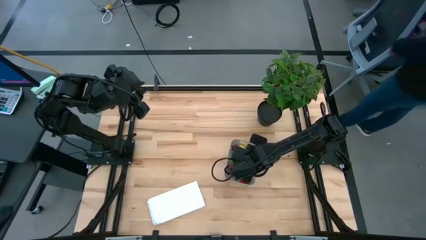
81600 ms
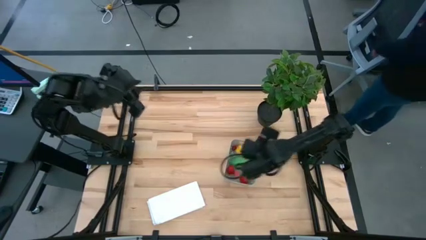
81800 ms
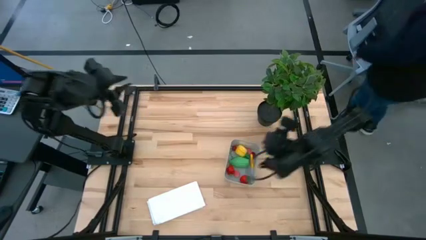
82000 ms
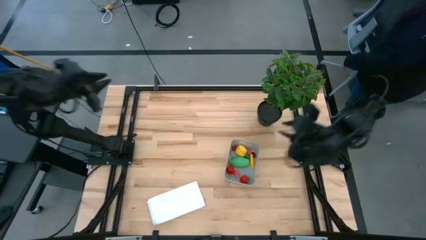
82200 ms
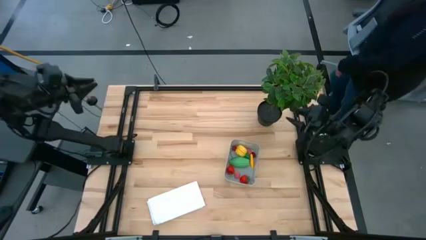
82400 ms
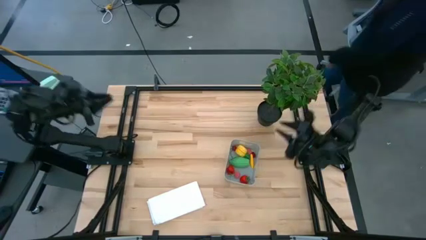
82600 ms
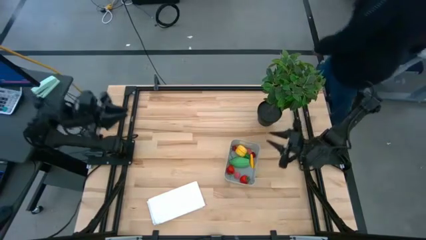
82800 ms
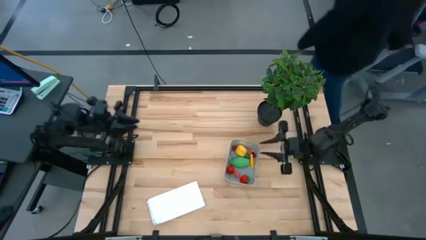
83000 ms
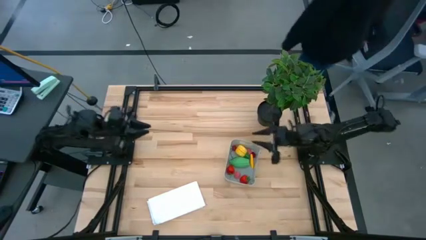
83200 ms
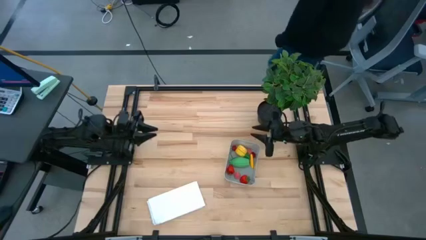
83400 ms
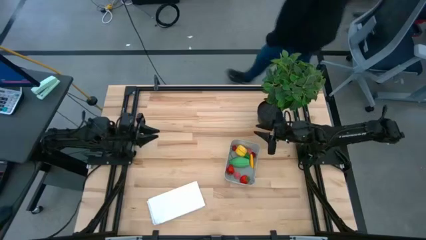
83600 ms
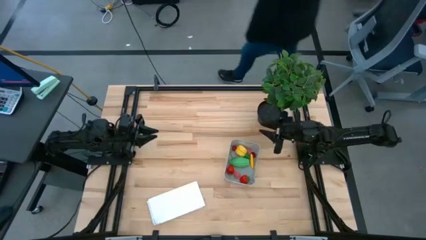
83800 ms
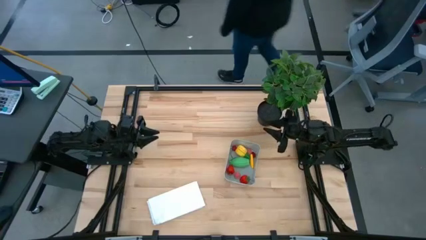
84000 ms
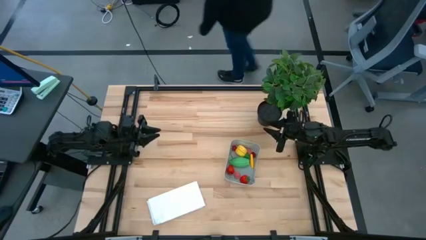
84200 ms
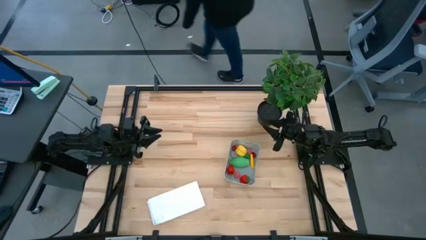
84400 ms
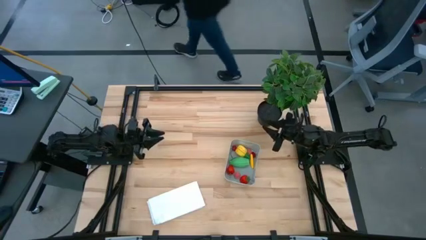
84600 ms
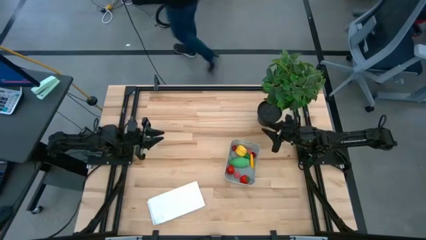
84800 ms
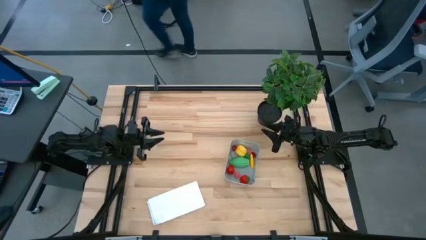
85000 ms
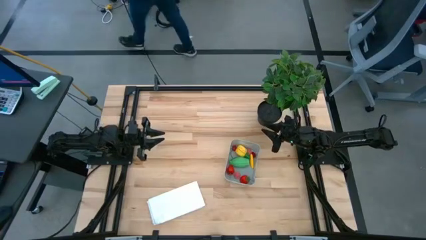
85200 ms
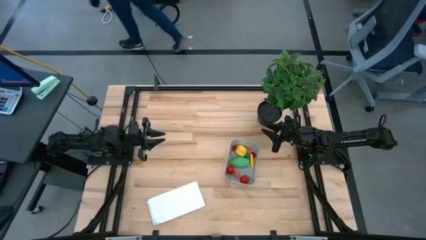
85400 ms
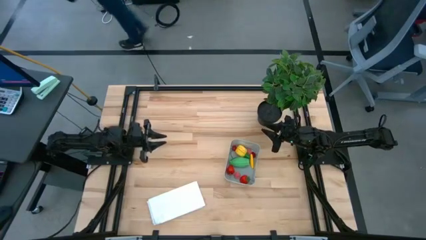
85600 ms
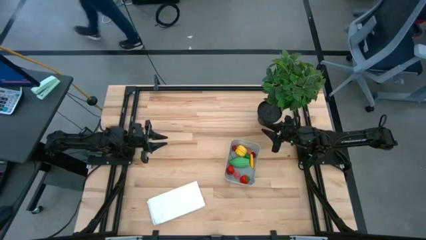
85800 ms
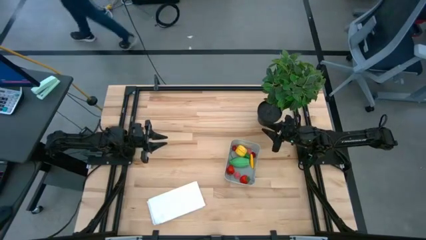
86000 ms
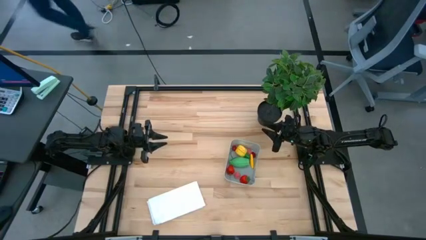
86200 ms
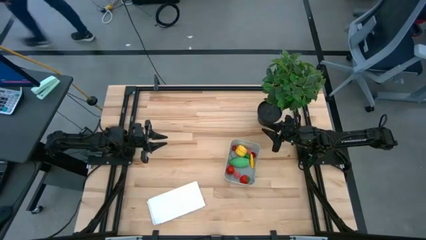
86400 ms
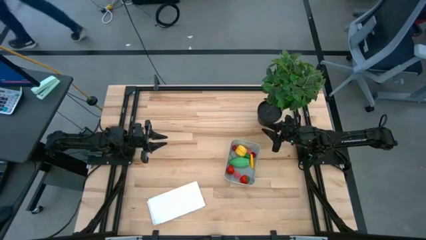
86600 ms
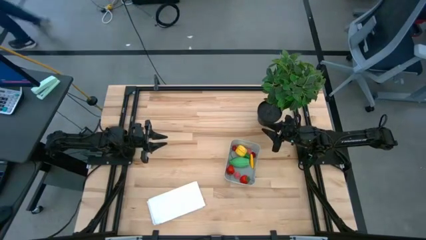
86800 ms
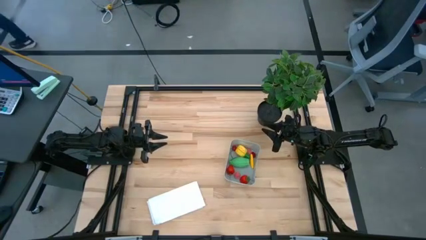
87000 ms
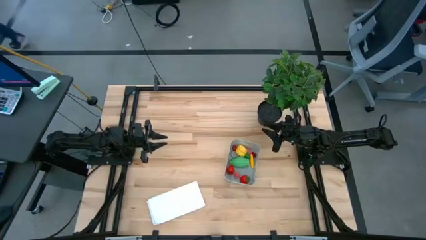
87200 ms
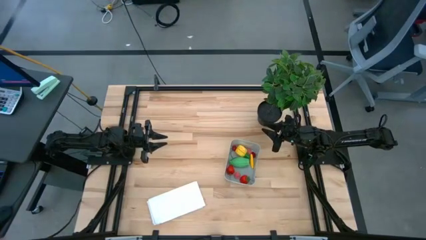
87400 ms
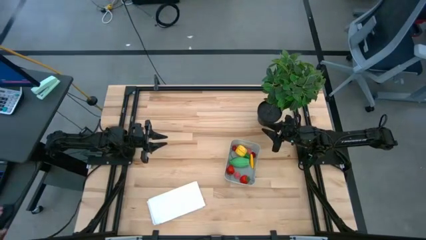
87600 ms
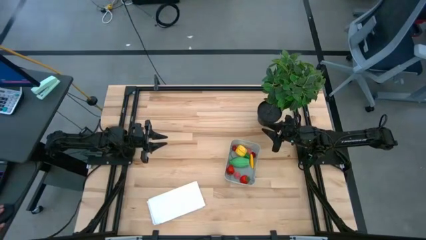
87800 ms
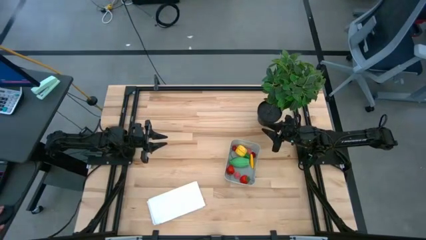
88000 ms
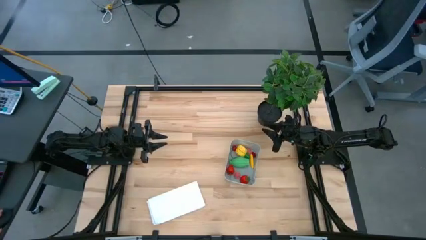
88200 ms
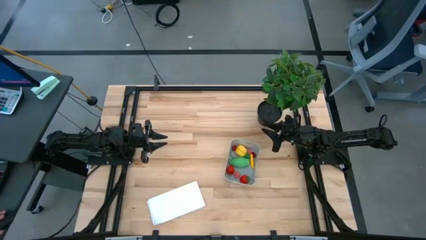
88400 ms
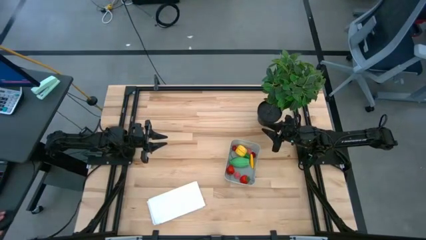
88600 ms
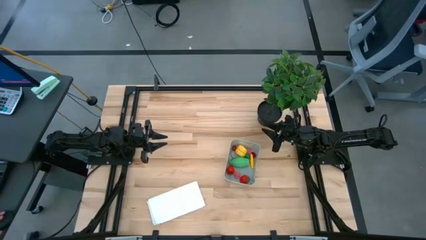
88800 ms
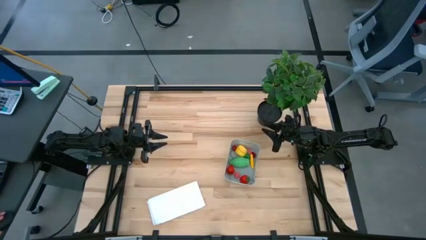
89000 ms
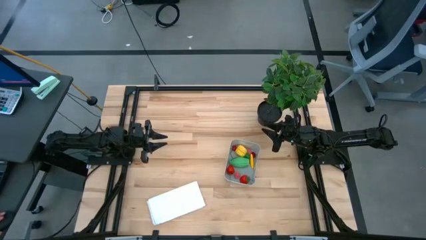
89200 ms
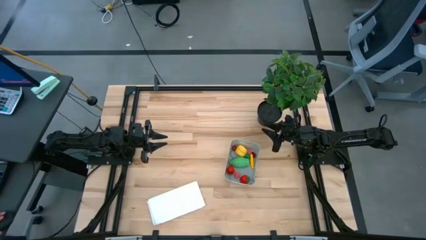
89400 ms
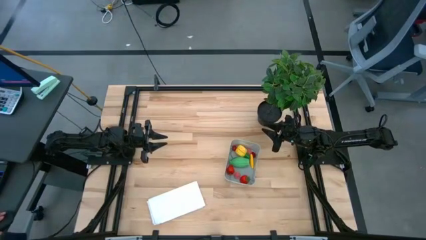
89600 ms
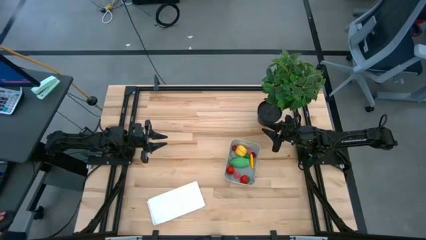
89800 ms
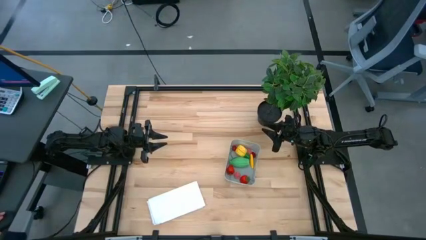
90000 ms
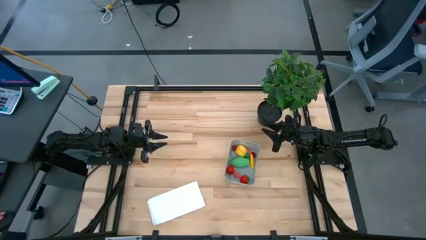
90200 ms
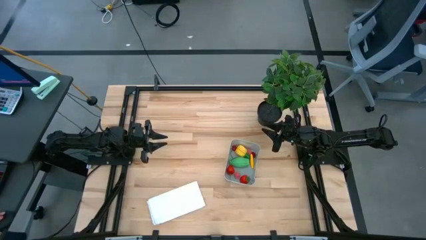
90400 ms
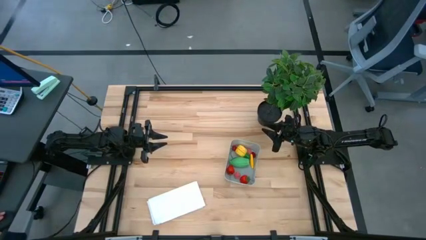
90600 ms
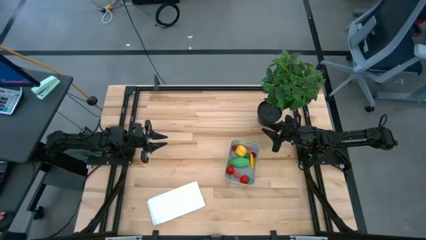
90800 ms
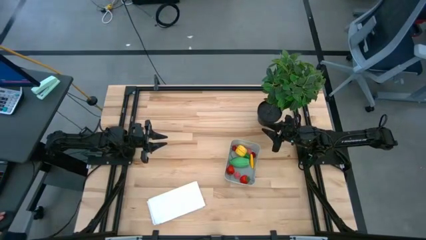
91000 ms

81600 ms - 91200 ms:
Task: Pick and placing Produce into tupperware
Return to Home Position

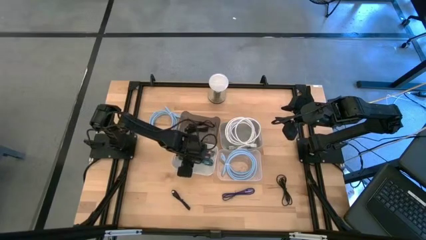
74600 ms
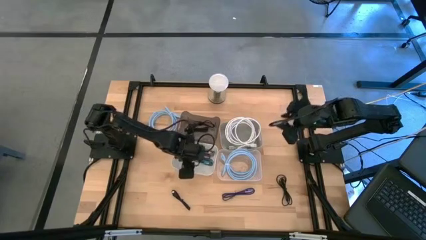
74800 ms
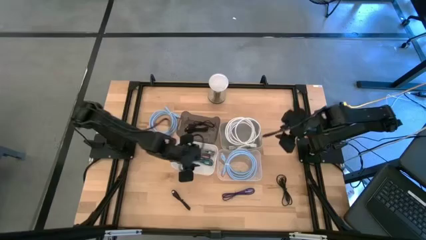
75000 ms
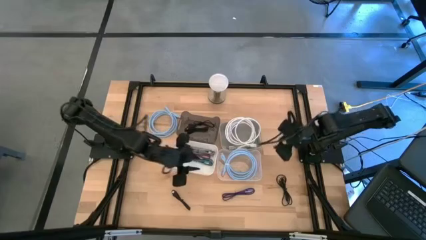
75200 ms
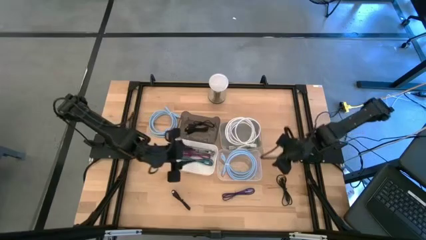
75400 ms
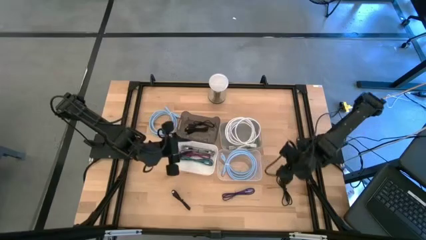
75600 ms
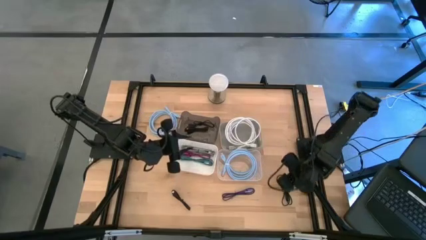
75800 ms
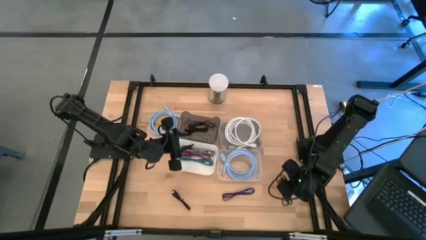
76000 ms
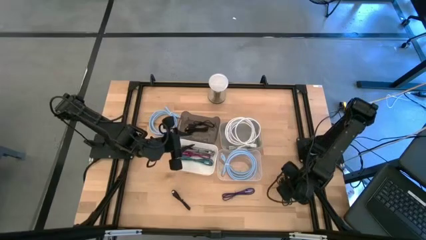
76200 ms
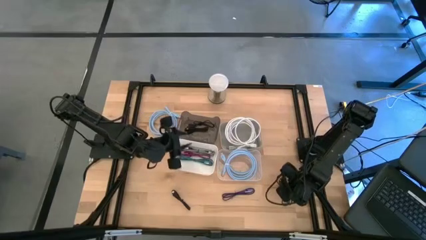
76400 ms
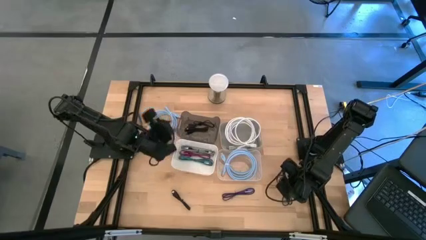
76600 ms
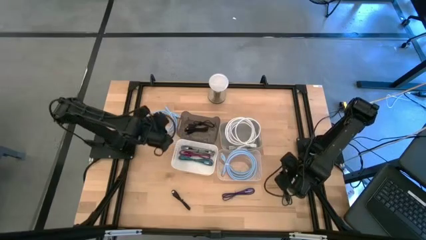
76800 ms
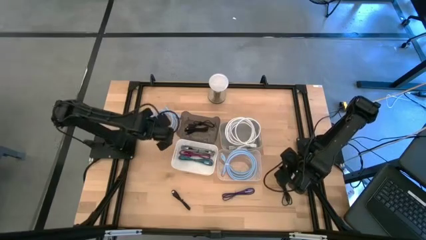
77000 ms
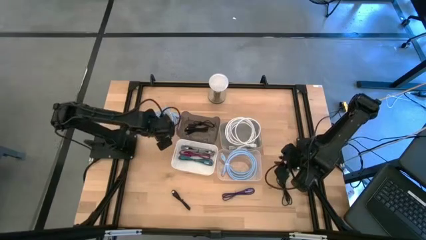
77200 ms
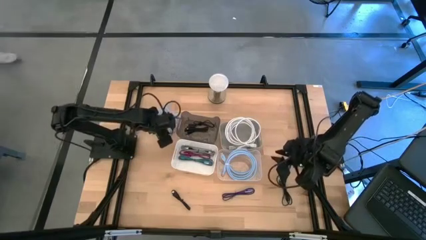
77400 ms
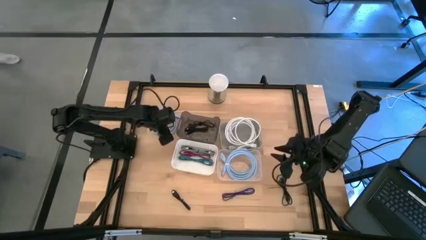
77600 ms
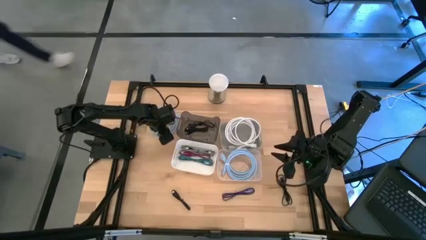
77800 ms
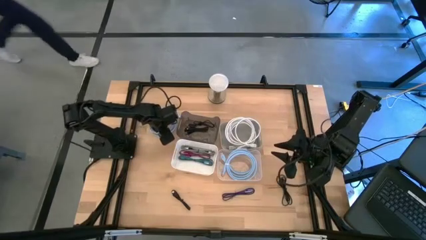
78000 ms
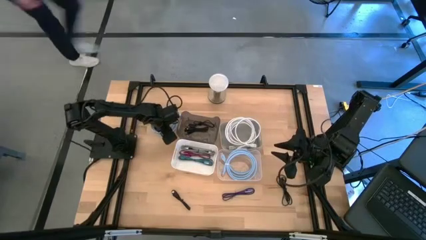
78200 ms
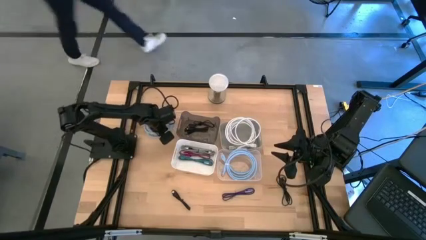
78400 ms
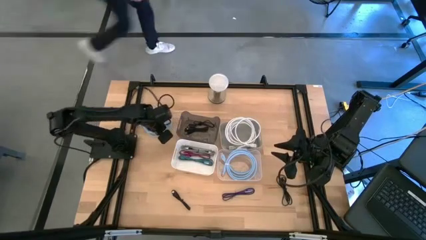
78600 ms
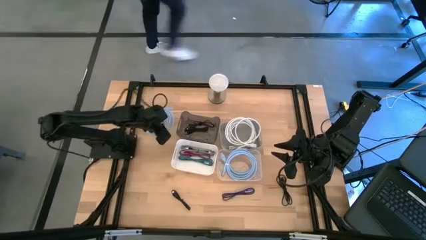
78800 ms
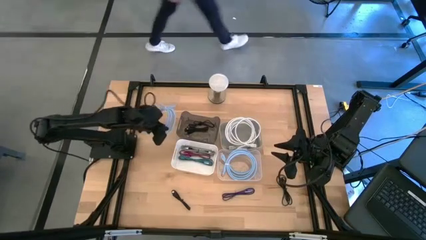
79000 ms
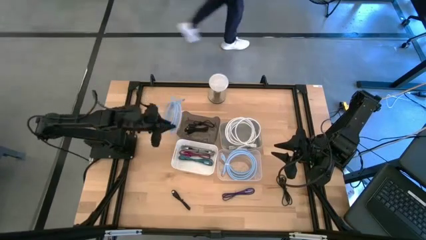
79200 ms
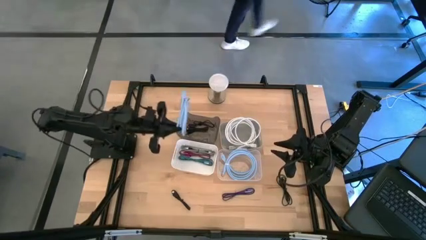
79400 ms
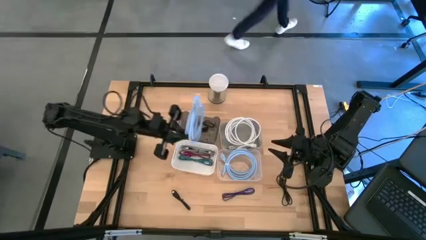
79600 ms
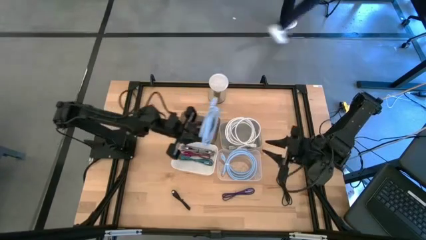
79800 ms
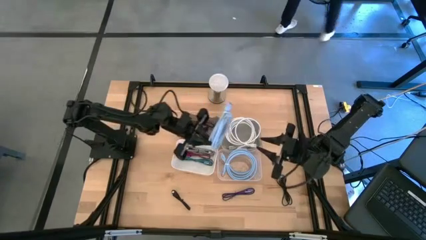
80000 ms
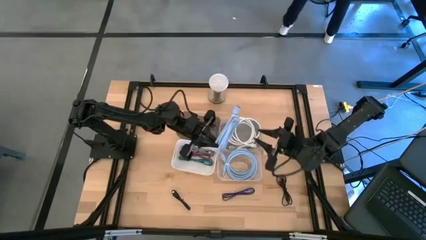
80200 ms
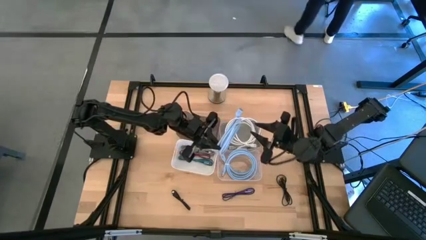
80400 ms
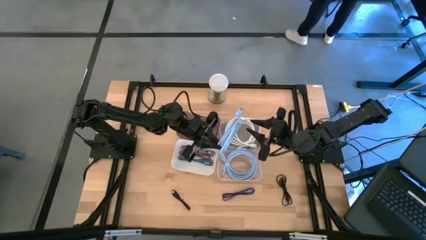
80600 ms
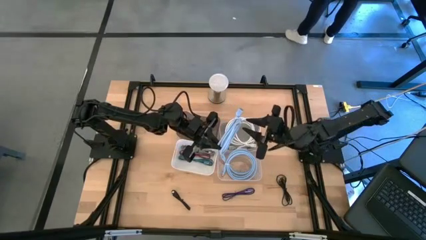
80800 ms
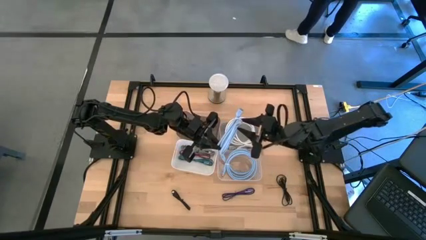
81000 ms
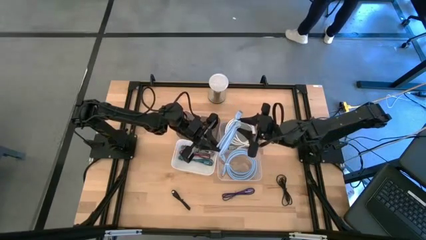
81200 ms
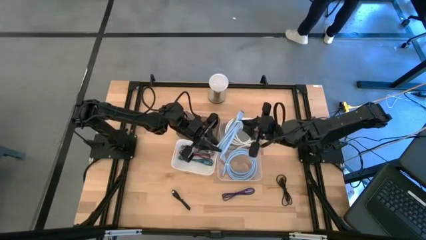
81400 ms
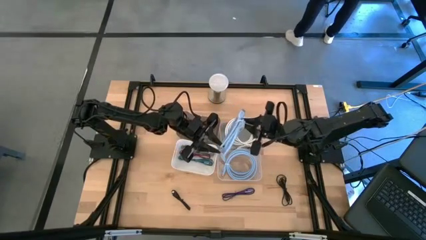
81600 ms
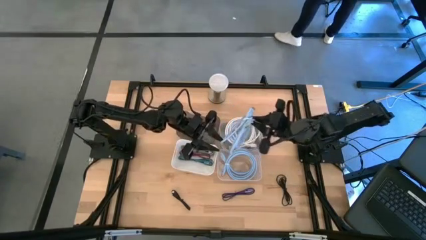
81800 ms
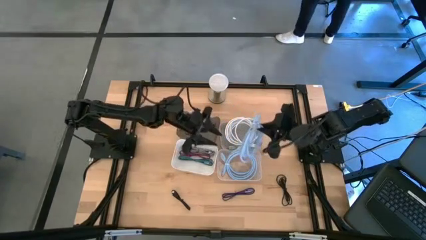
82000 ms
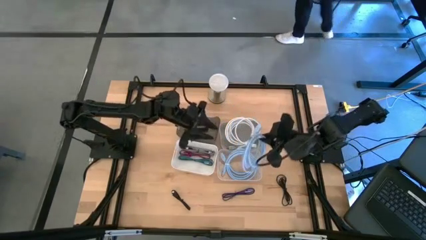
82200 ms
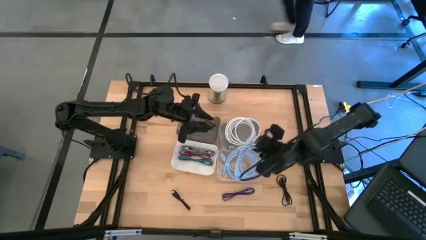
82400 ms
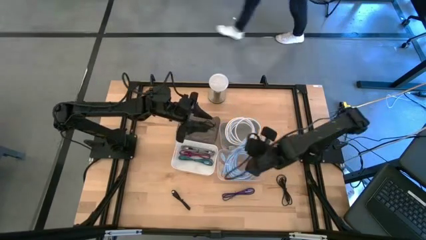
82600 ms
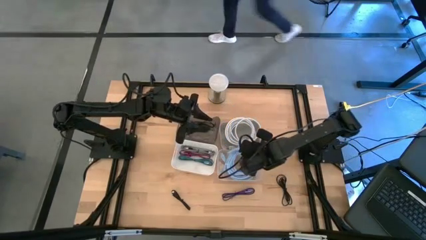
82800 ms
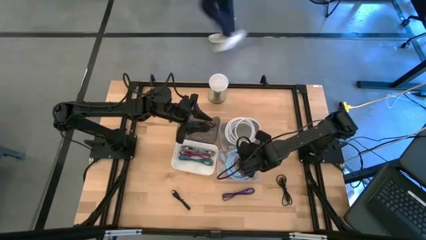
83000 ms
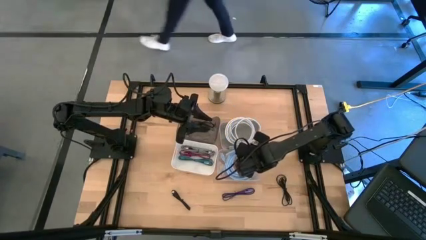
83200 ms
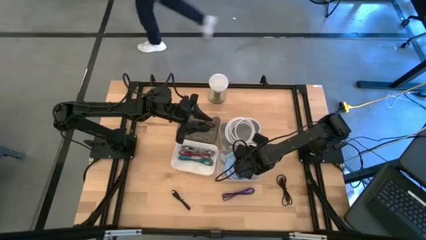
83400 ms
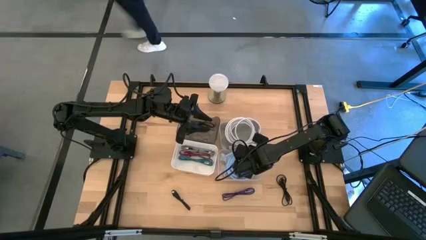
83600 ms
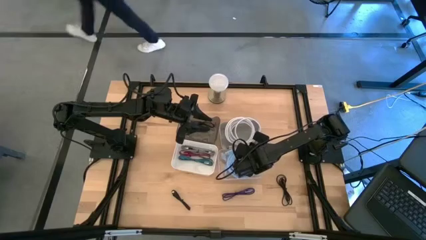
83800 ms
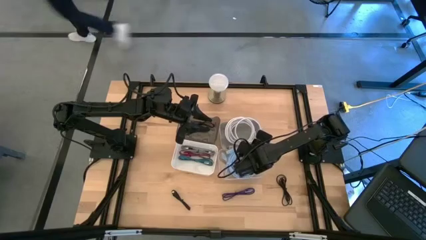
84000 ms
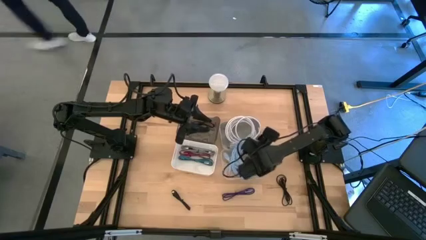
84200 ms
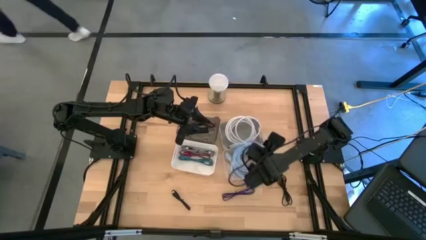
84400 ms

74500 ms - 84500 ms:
Task: Pick & Place USB Port
Put the blue usb cable into the transparent bin
